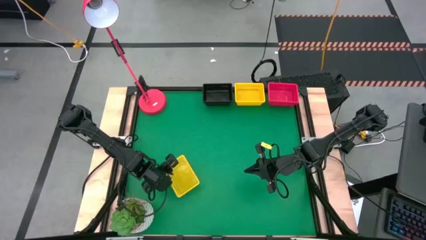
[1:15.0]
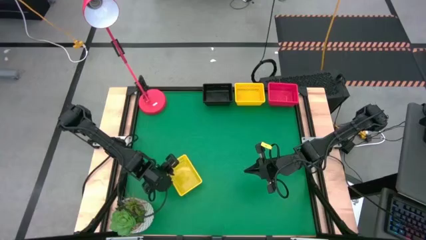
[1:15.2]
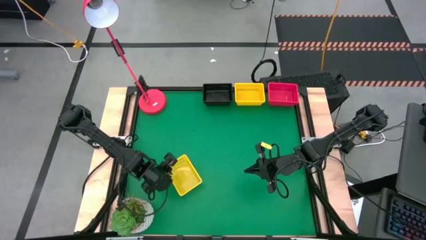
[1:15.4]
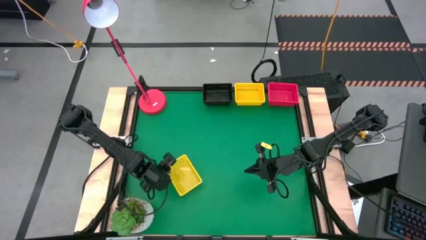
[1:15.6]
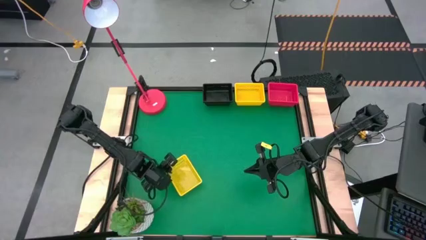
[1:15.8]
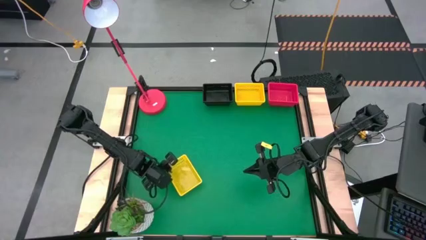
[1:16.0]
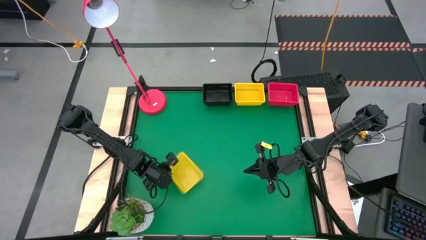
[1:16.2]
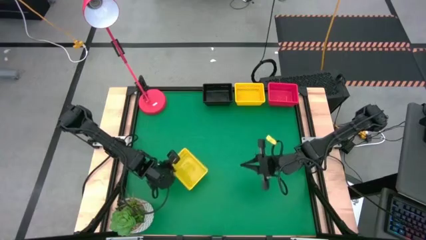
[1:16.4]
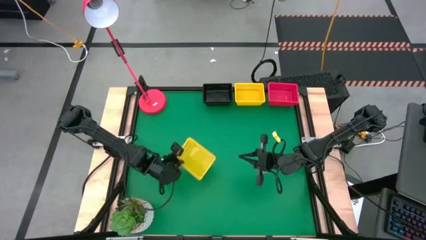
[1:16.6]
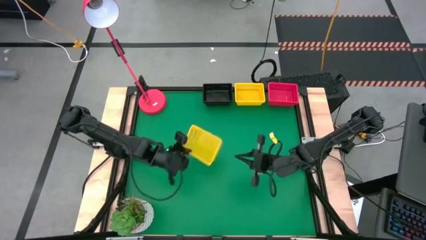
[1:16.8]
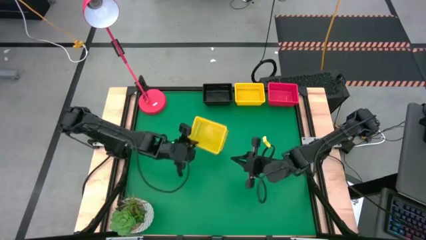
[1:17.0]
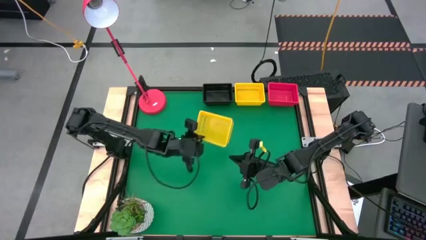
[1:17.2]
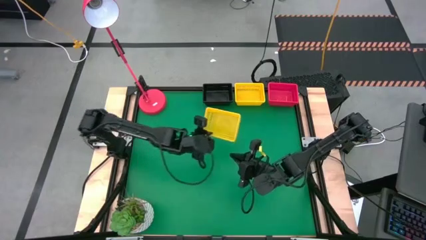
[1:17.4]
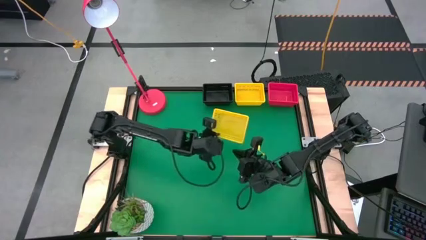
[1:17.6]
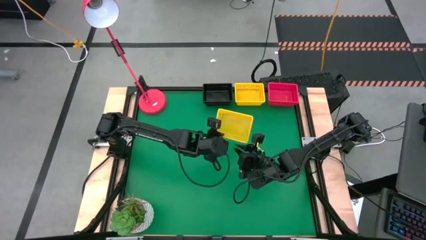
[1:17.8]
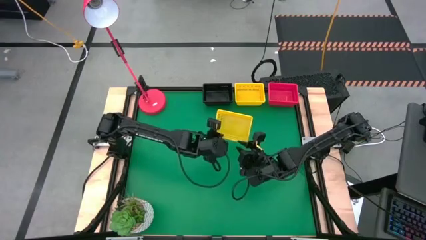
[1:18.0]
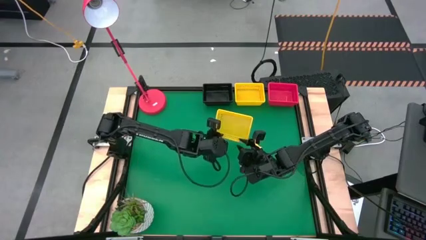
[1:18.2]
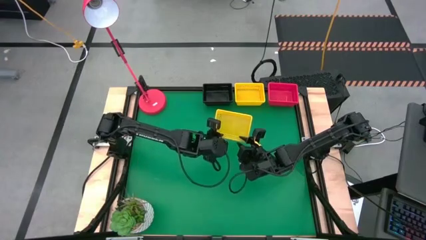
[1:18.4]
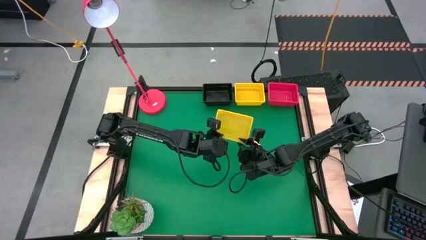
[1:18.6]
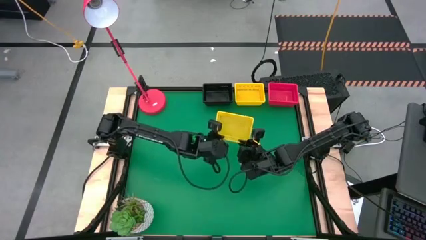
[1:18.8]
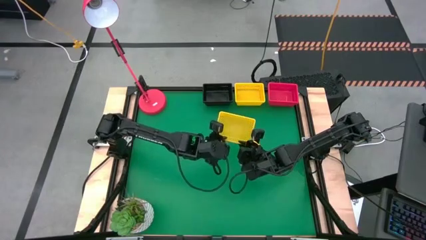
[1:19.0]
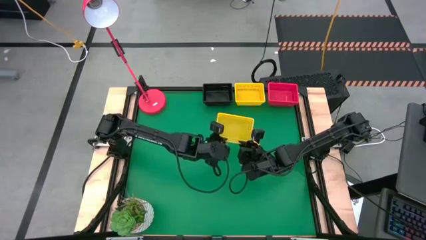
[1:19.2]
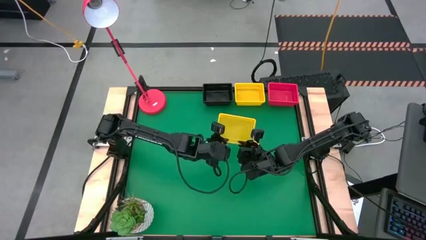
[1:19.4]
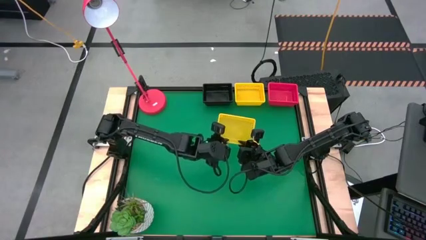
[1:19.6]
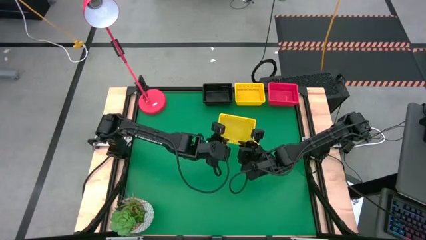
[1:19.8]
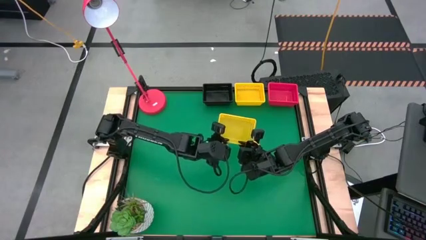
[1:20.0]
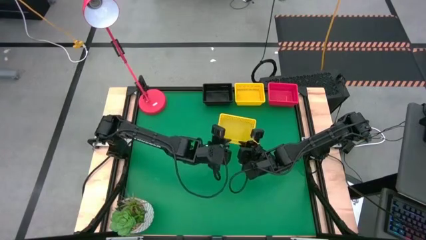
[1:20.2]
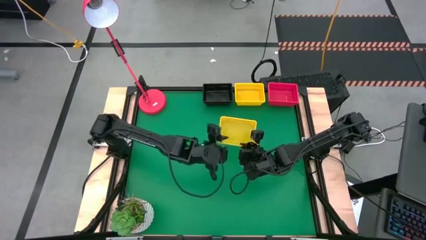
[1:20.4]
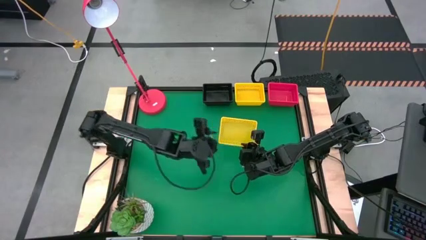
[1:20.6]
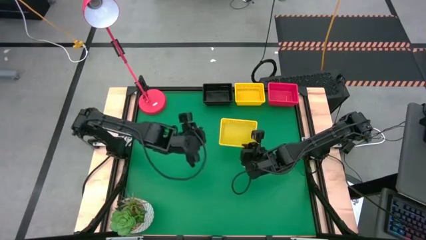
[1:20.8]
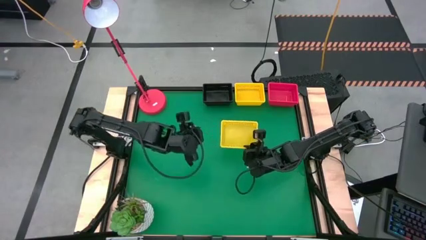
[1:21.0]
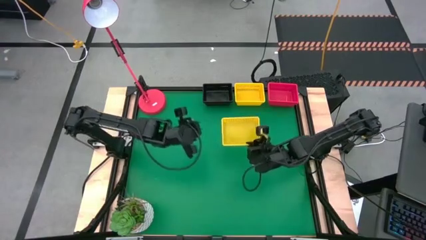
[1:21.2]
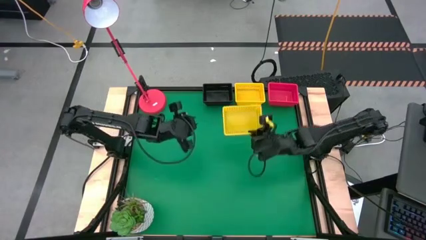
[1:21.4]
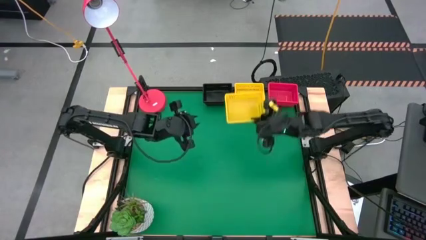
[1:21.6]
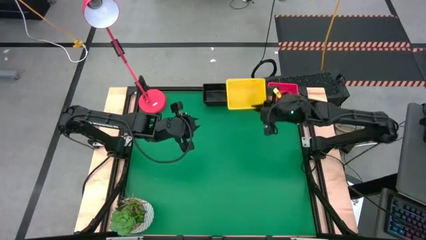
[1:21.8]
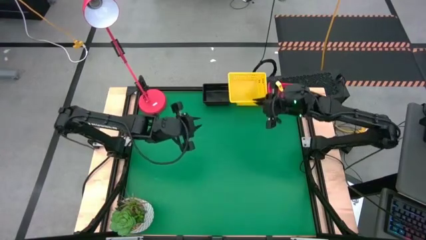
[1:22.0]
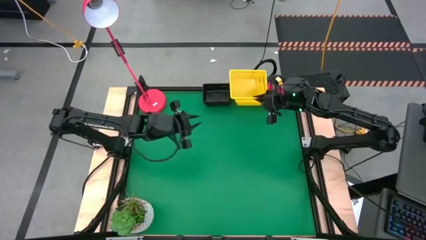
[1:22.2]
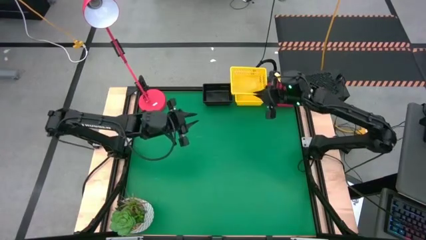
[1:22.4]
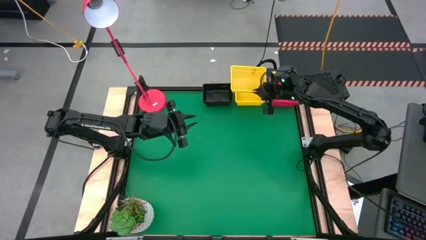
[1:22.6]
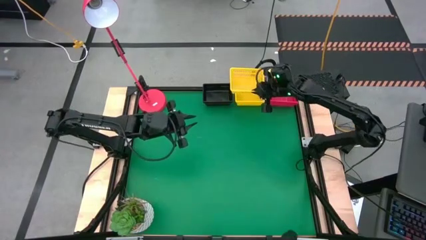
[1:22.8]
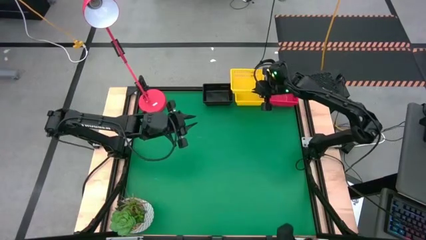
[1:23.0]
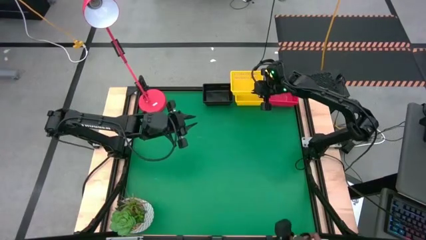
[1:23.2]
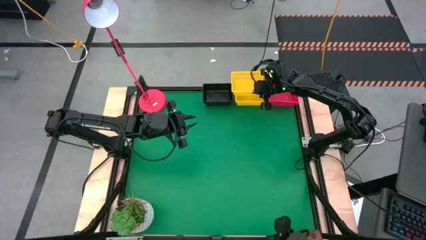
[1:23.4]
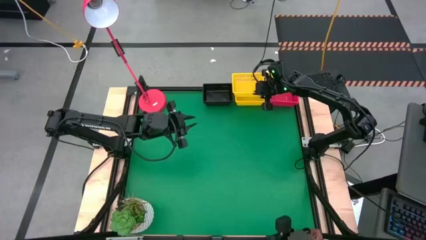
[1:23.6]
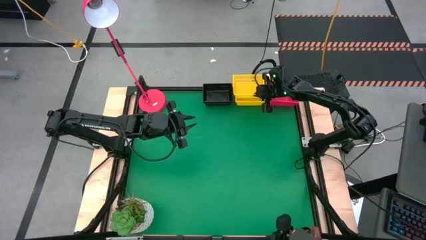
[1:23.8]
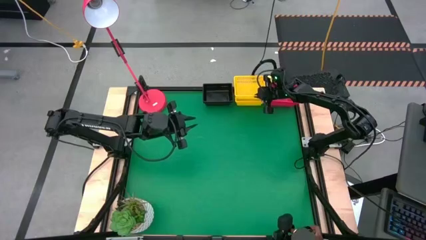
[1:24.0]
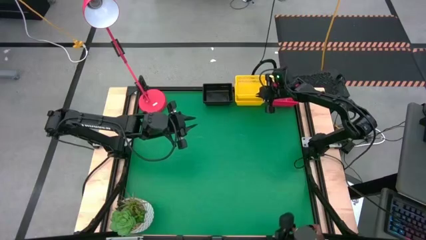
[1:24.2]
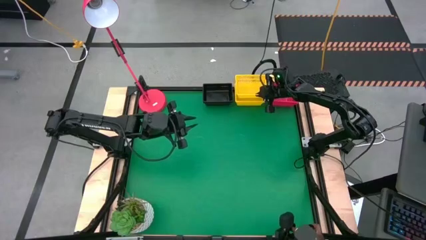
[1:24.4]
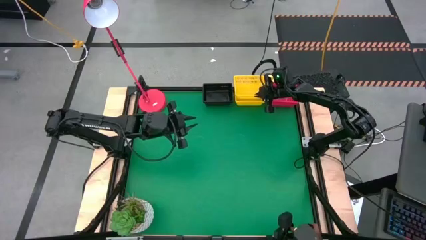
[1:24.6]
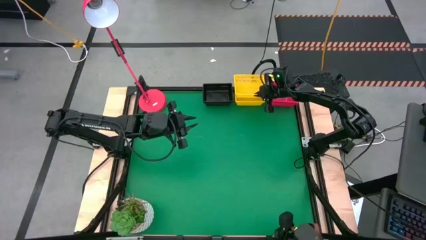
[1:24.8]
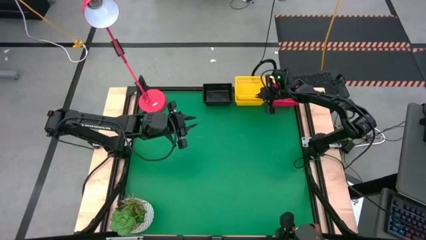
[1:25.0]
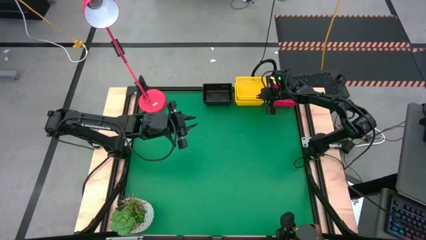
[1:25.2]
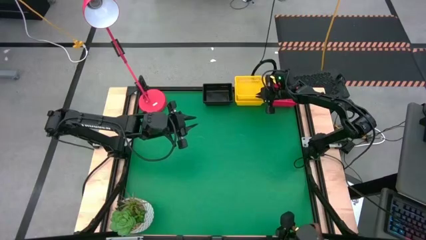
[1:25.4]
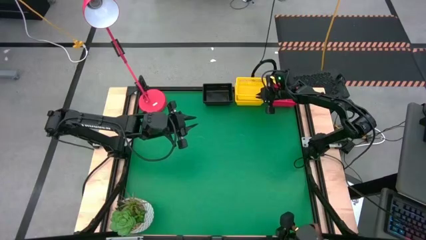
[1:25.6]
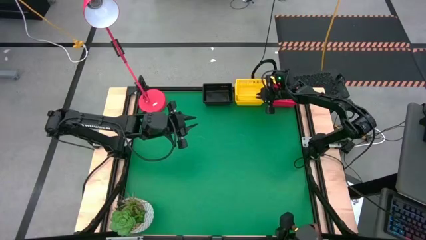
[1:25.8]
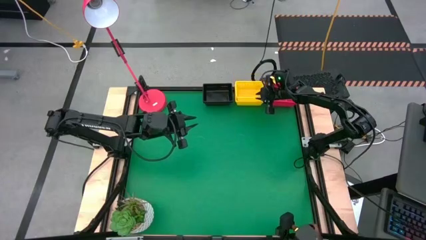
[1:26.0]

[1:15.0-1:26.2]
Stack the bottom yellow bin on the top yellow bins
